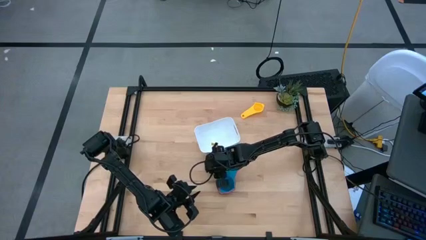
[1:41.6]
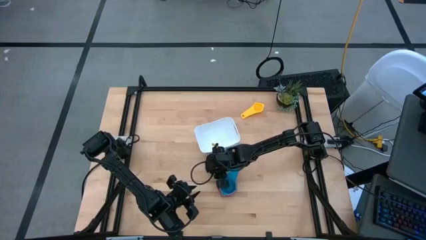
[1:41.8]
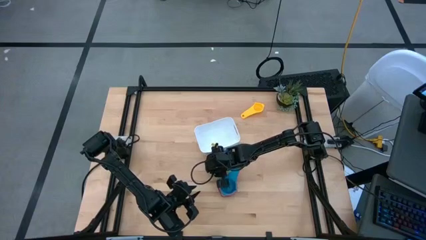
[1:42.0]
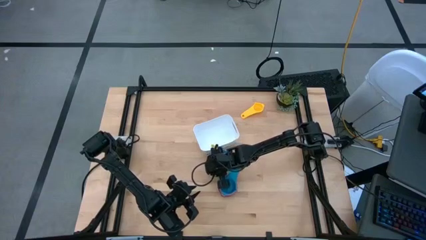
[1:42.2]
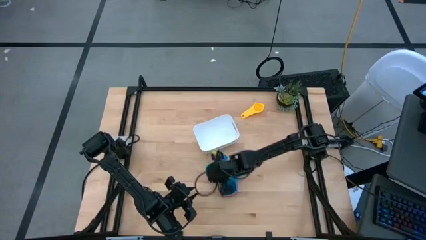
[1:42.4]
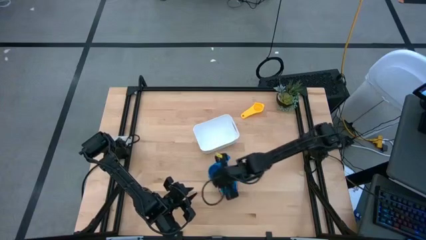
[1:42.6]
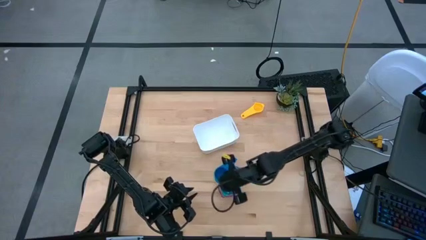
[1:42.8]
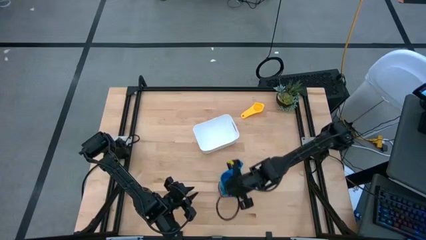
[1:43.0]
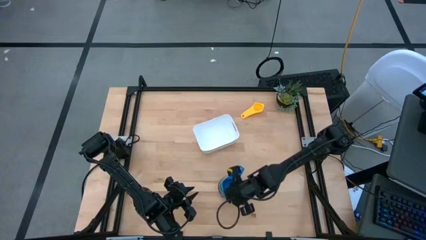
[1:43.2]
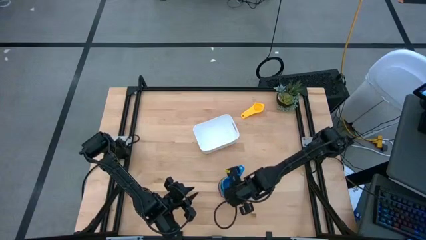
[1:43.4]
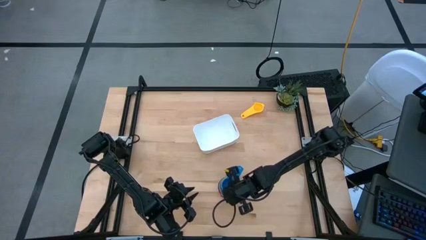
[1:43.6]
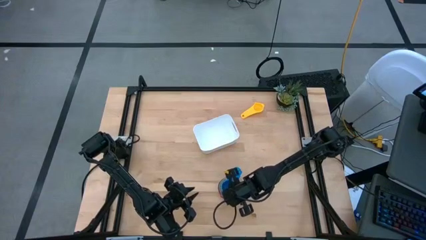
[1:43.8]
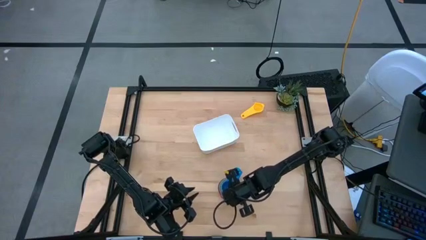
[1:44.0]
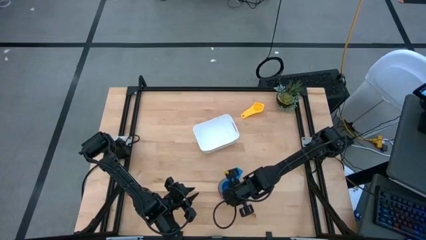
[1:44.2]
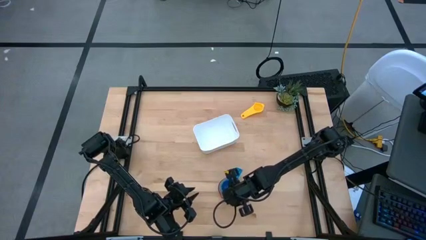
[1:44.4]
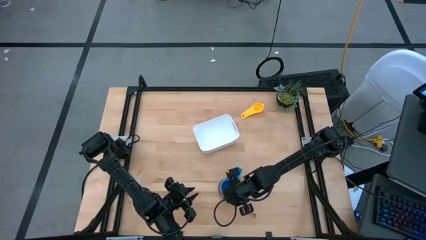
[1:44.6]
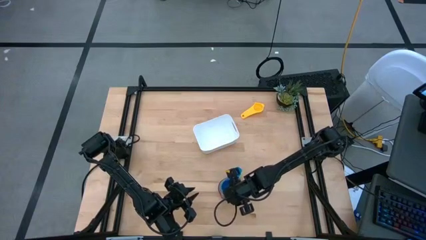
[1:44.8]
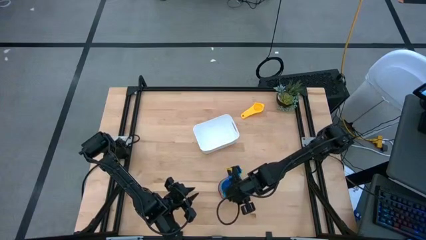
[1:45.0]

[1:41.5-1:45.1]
Task: Nest measuring cups in basket
Stack the stacked blue and green measuring cup on top of the stacked measuring cups

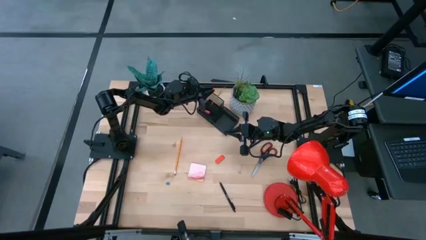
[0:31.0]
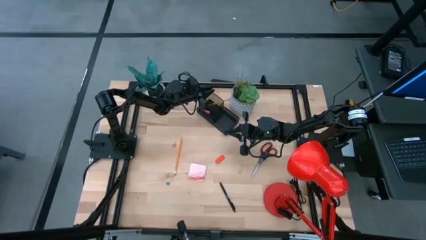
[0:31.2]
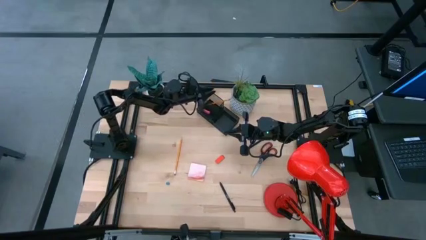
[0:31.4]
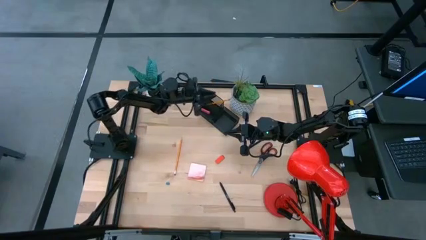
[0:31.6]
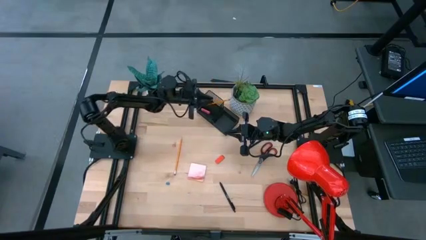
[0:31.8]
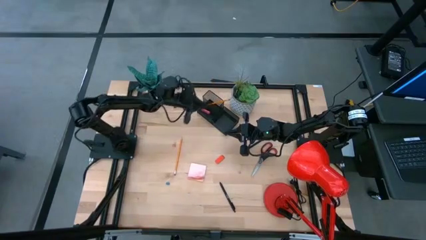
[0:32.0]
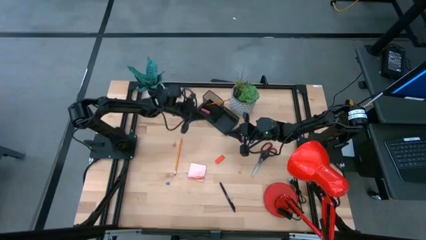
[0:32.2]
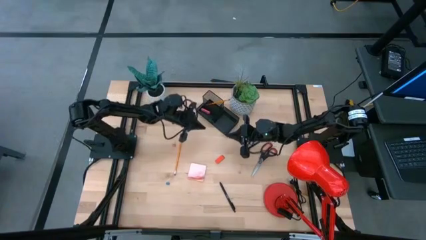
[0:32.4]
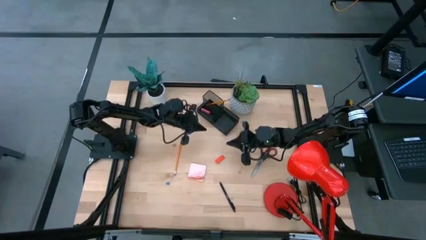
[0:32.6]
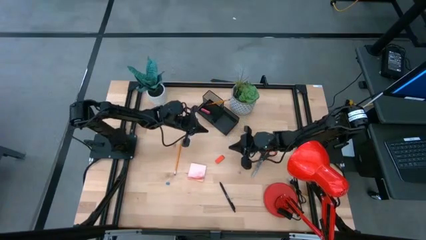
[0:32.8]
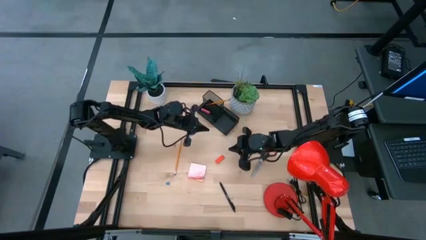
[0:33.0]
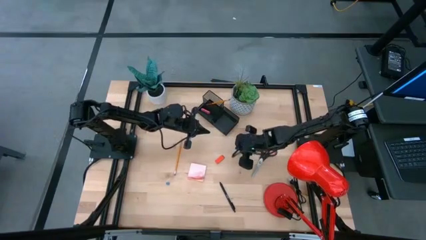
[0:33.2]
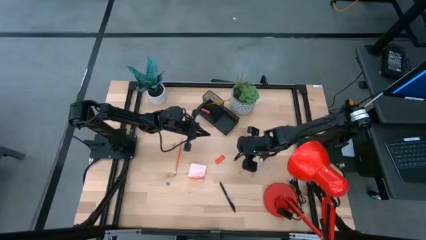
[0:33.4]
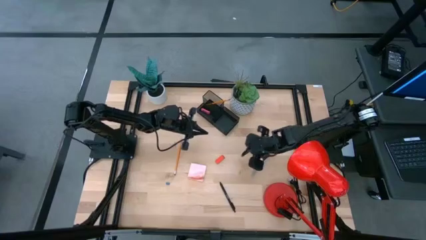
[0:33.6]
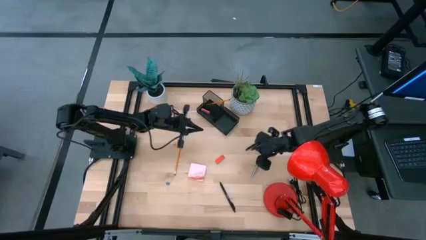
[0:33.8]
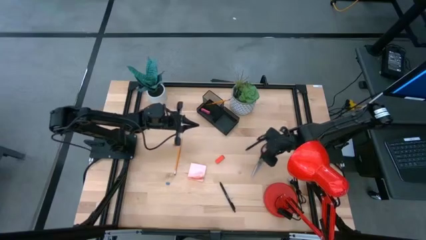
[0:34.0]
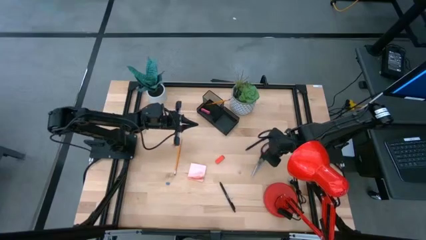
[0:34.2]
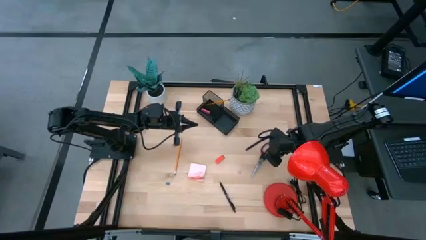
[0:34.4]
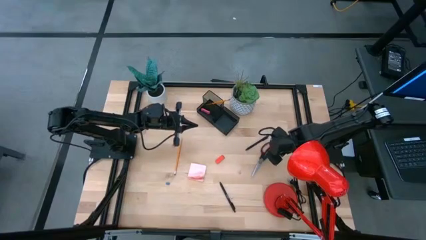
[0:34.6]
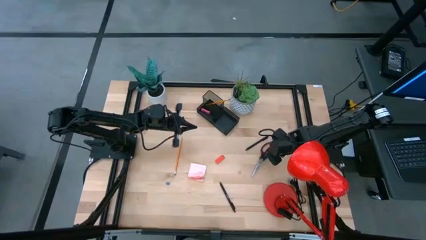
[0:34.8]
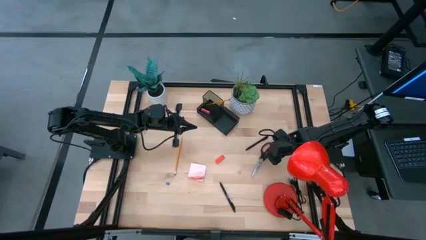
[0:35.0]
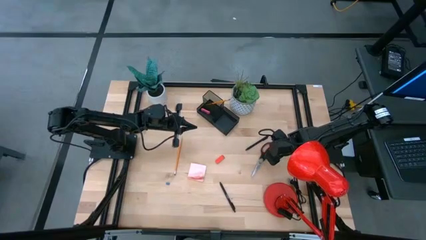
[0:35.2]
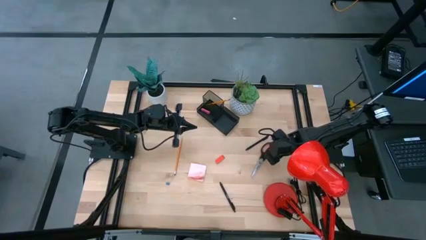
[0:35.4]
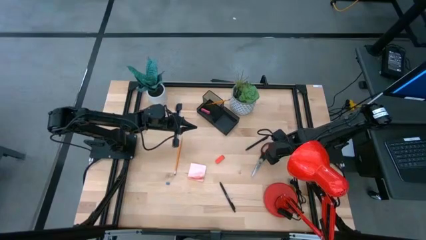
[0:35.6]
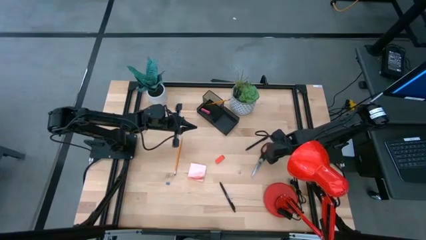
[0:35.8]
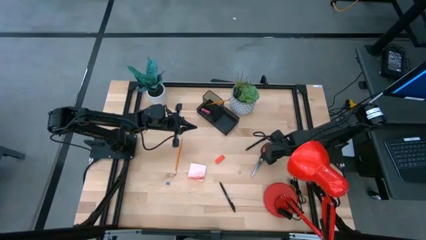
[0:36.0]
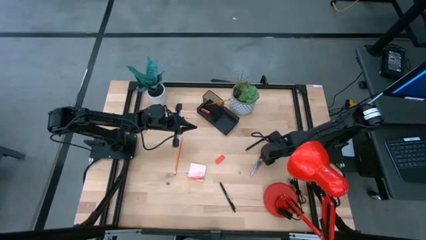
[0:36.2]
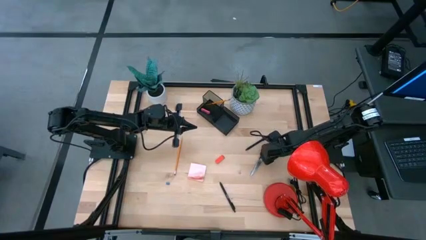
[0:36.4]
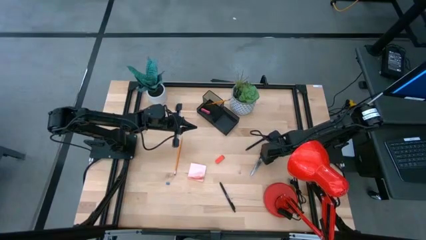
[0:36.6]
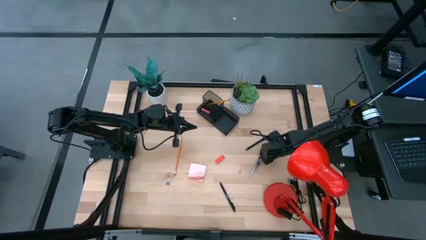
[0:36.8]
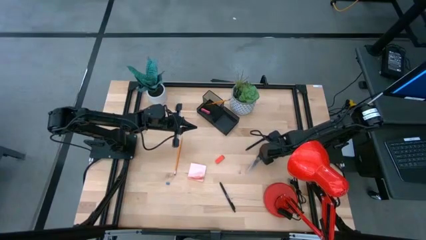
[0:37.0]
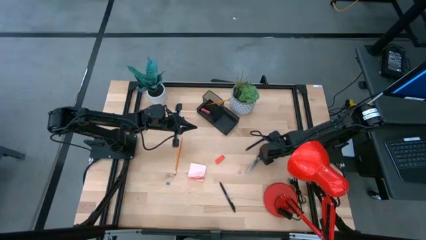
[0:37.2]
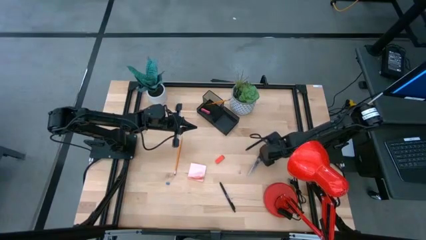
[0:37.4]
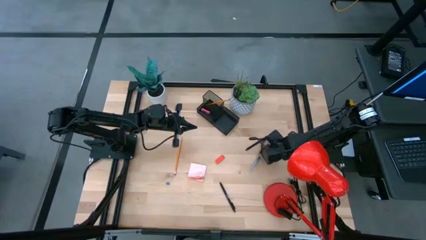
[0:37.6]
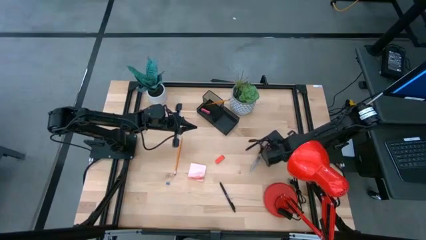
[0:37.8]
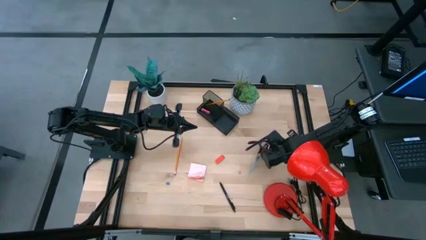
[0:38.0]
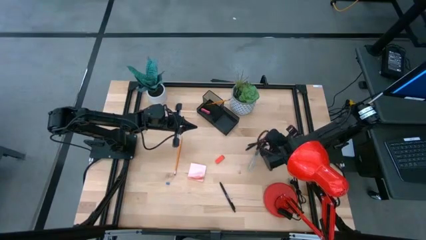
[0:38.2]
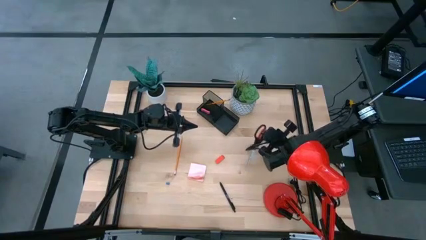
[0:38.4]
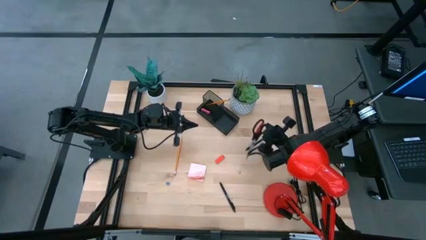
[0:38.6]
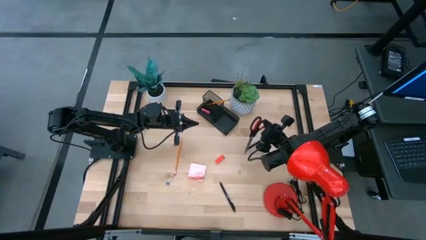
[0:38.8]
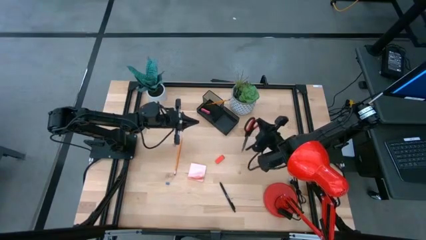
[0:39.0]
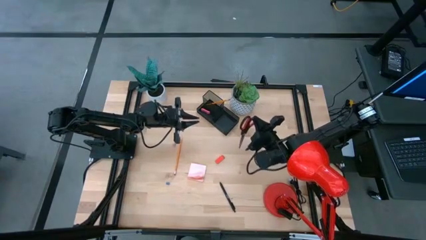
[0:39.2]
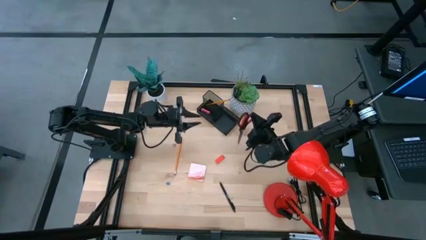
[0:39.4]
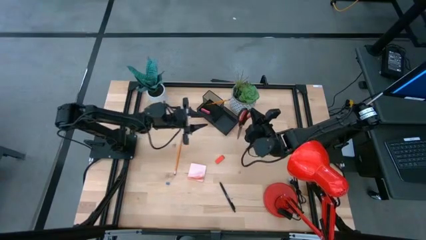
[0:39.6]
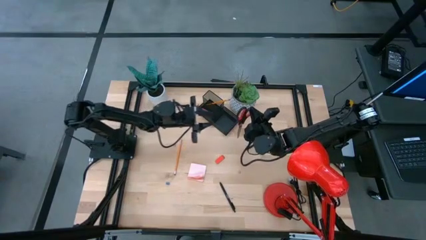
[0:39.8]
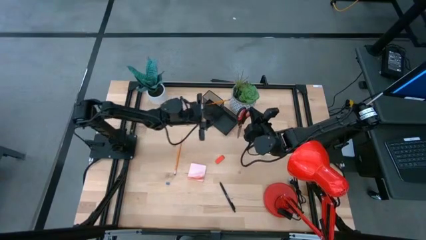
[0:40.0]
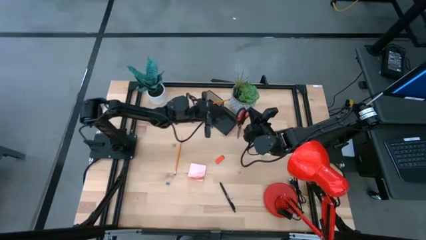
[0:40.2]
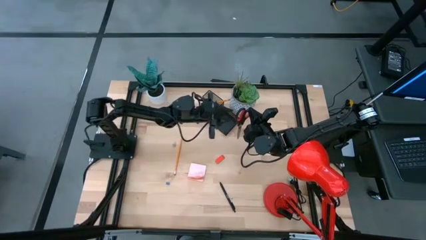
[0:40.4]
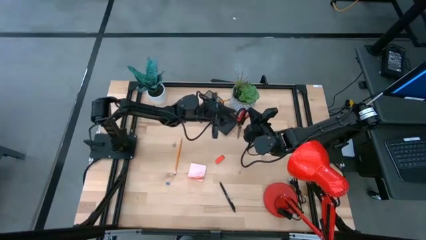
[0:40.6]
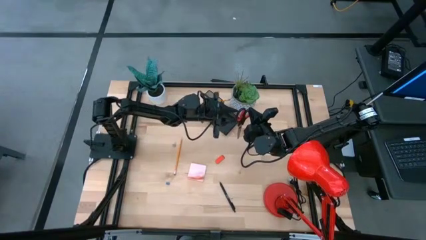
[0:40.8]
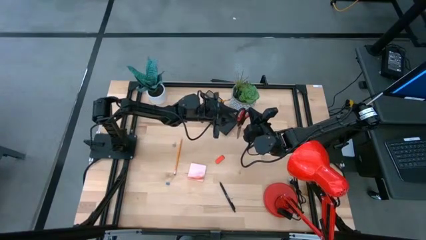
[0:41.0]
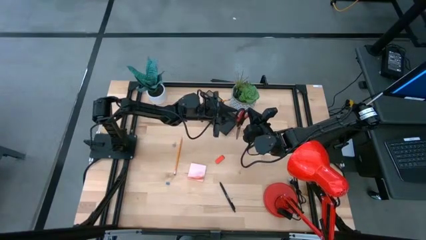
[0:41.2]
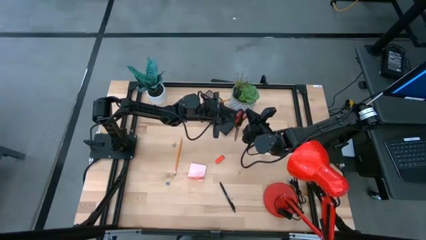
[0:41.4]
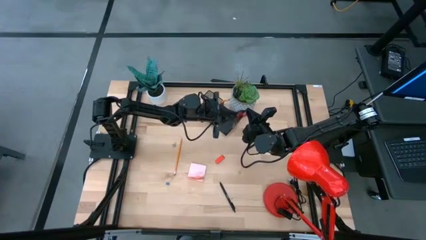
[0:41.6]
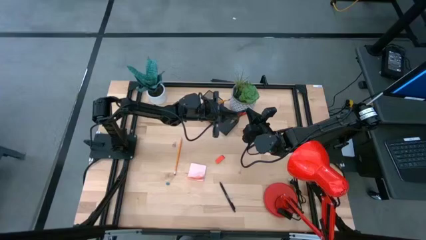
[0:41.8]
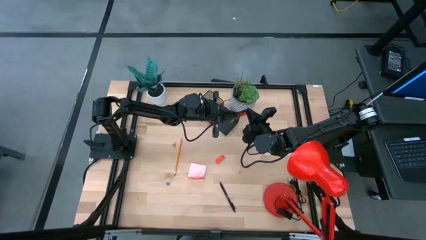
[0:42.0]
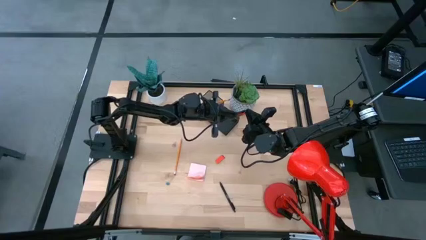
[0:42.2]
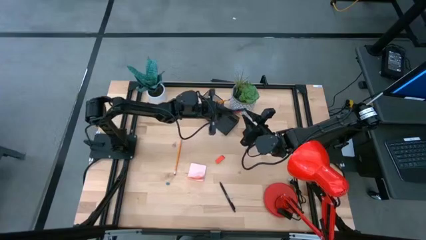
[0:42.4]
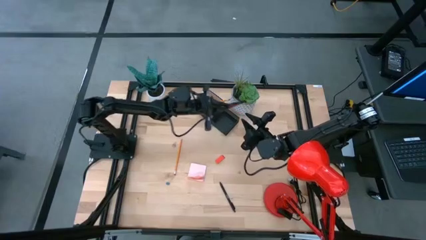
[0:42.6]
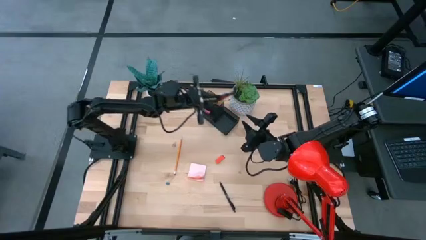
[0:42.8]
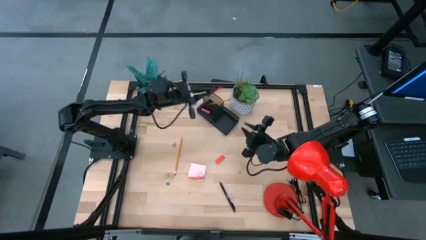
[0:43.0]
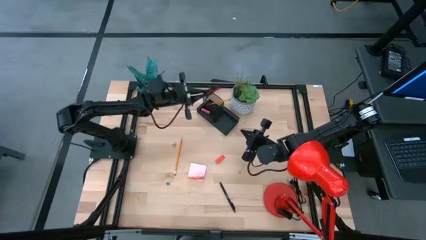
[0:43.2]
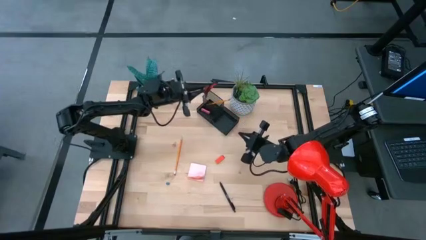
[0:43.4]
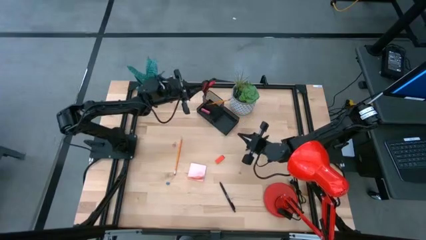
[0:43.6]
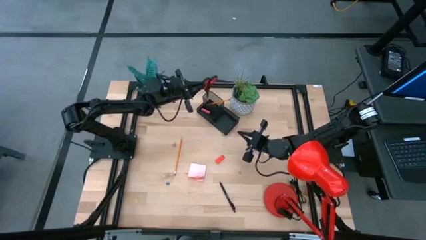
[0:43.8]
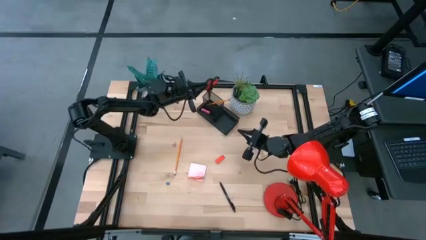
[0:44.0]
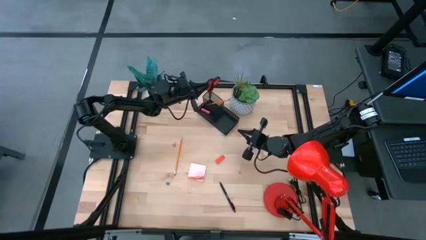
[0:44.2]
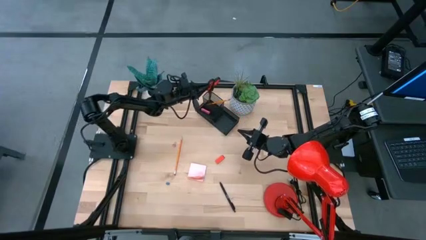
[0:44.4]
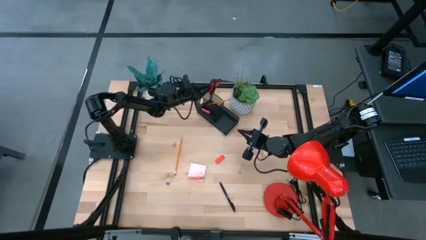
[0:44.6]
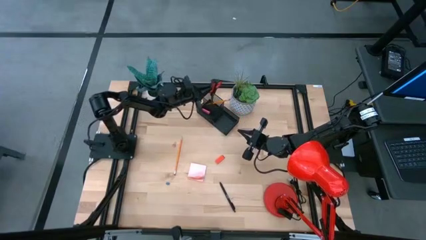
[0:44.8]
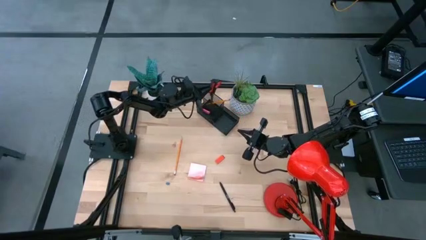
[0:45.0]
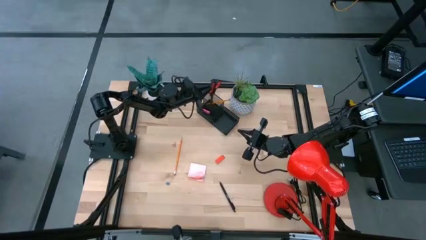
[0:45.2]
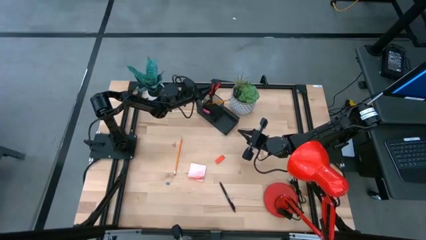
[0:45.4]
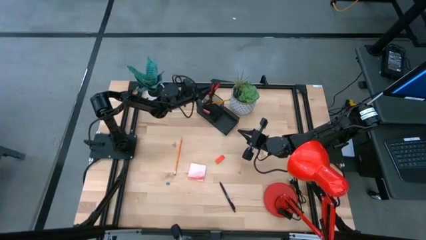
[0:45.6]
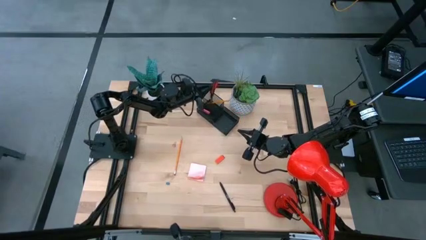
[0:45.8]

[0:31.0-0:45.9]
Task: Pick and place office supplies into organizer
Put the black scissors into the black desk organizer
